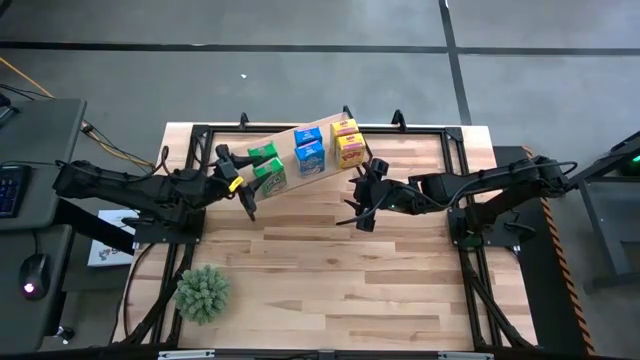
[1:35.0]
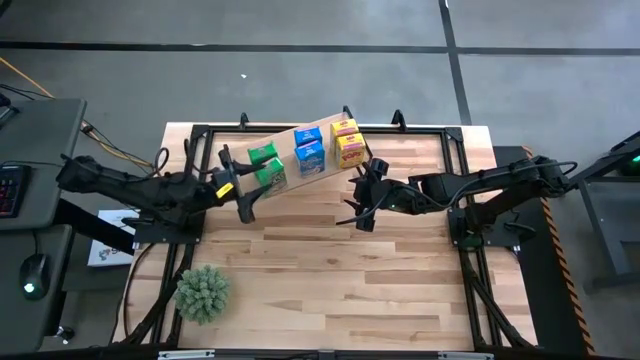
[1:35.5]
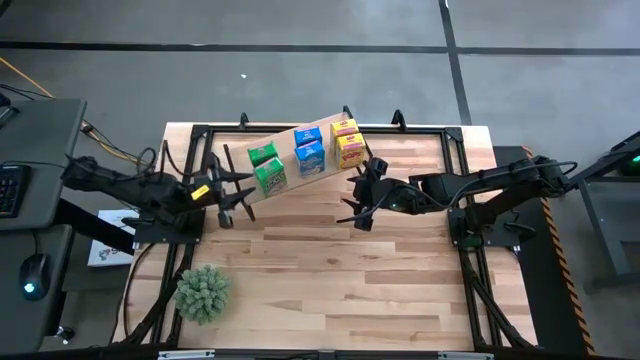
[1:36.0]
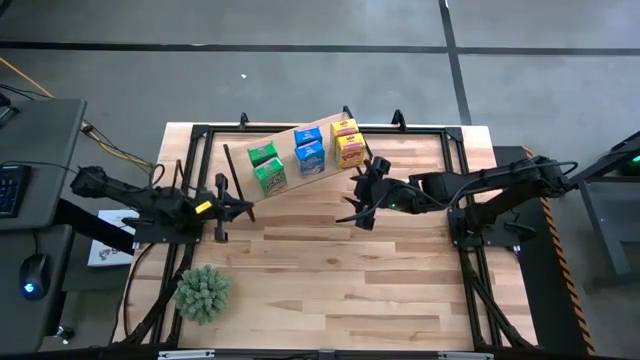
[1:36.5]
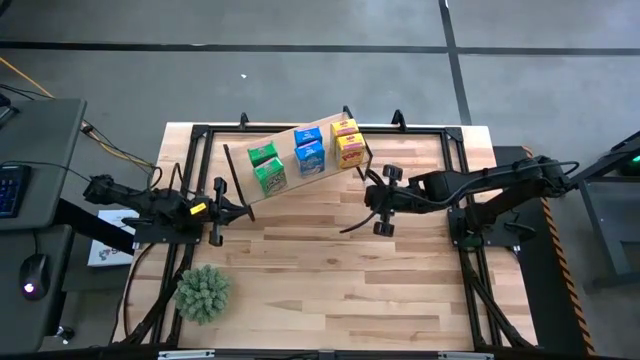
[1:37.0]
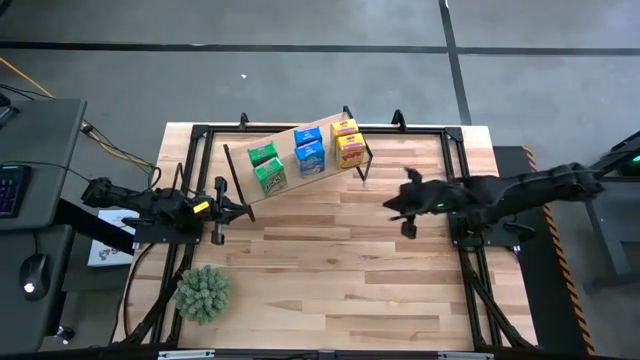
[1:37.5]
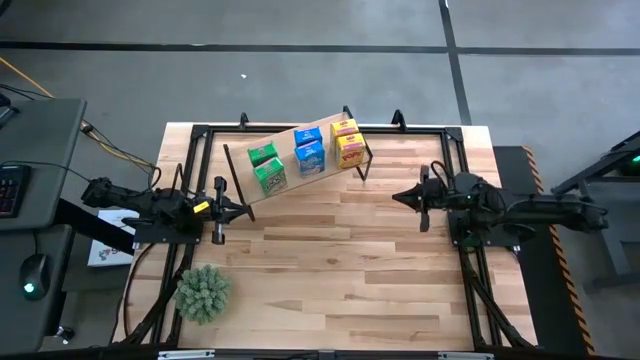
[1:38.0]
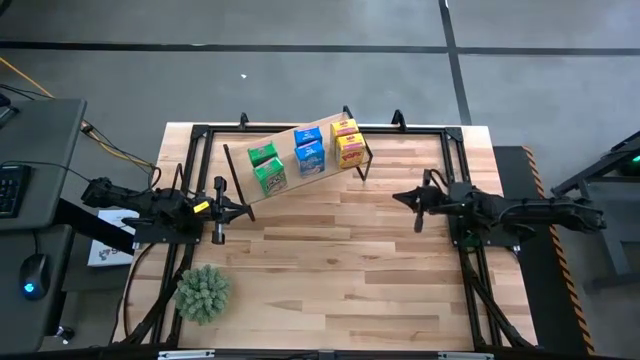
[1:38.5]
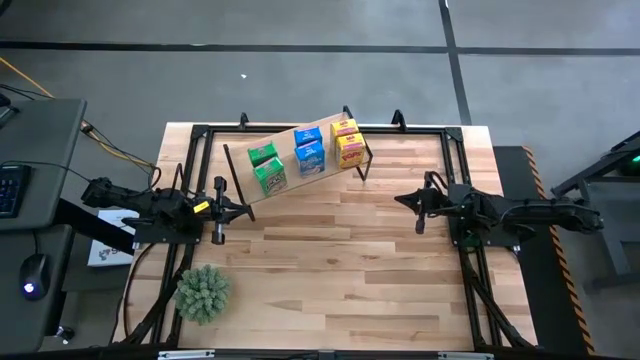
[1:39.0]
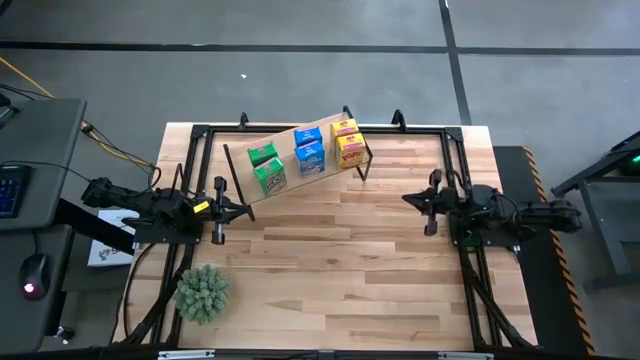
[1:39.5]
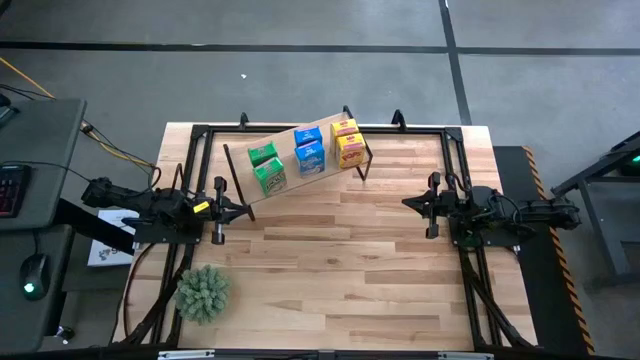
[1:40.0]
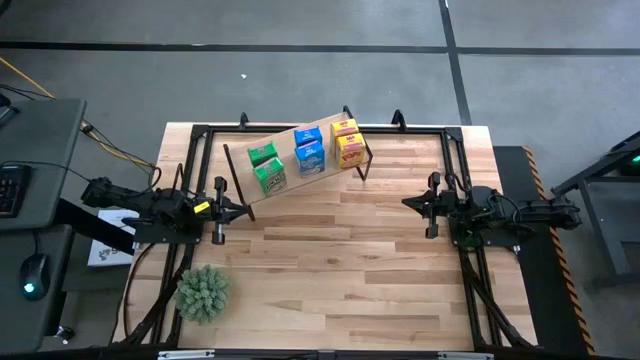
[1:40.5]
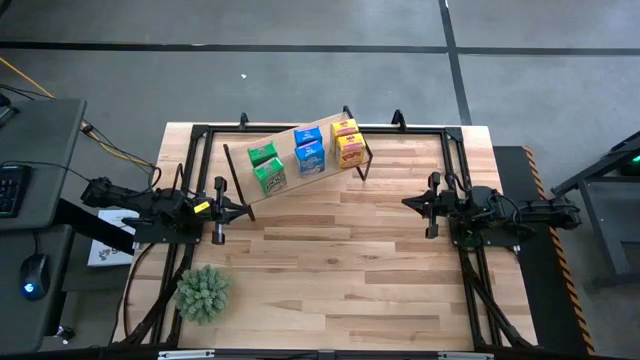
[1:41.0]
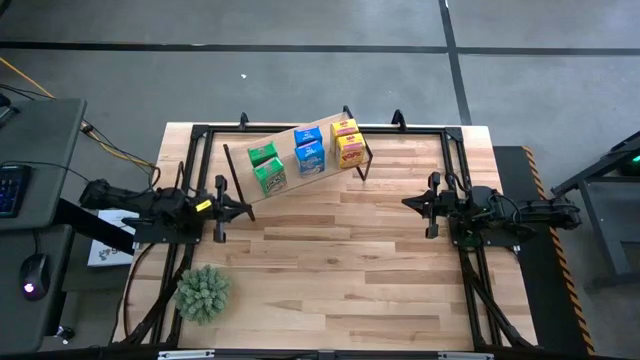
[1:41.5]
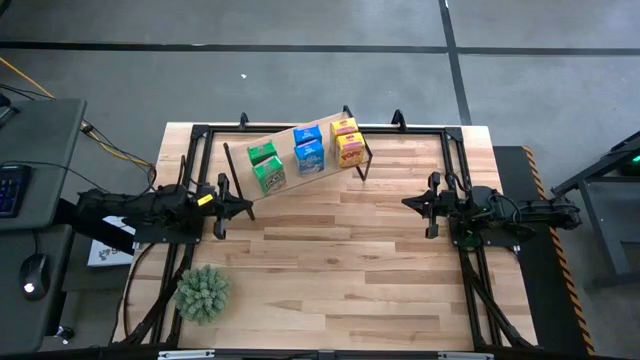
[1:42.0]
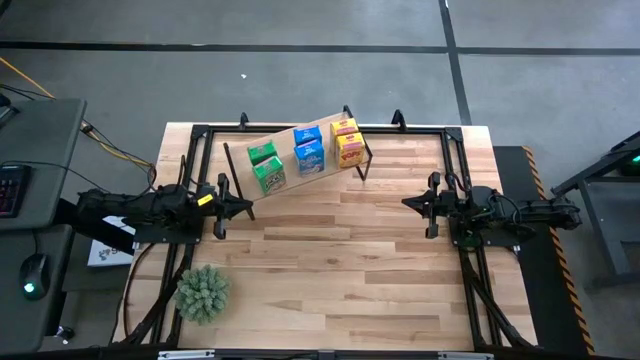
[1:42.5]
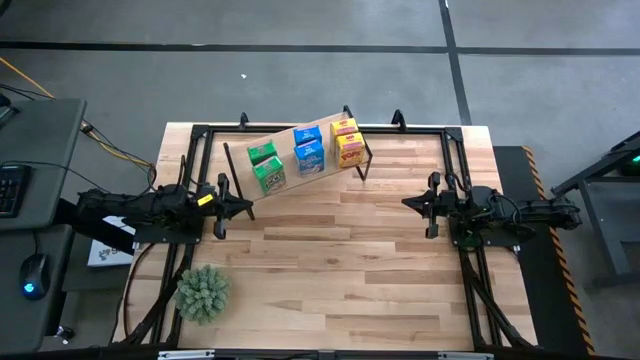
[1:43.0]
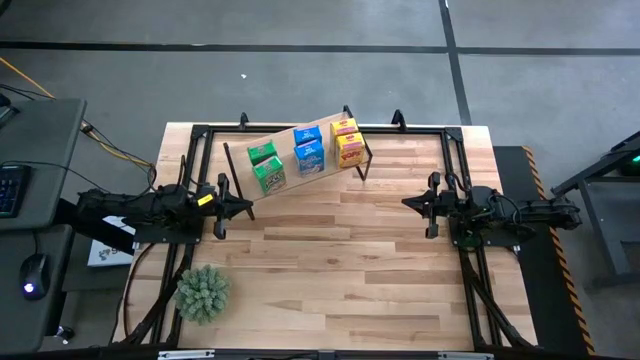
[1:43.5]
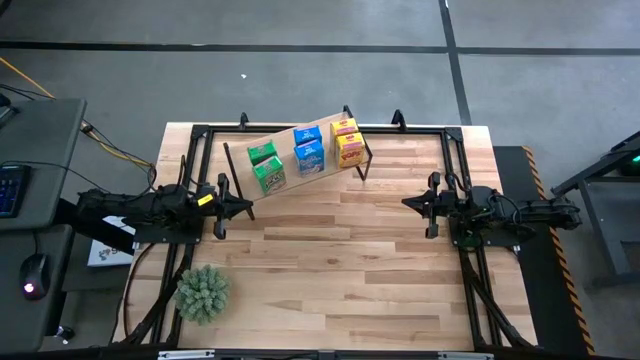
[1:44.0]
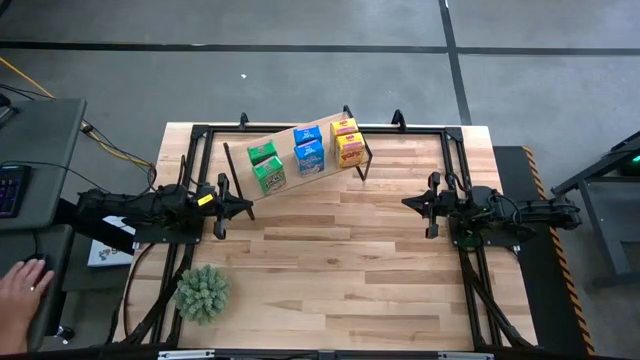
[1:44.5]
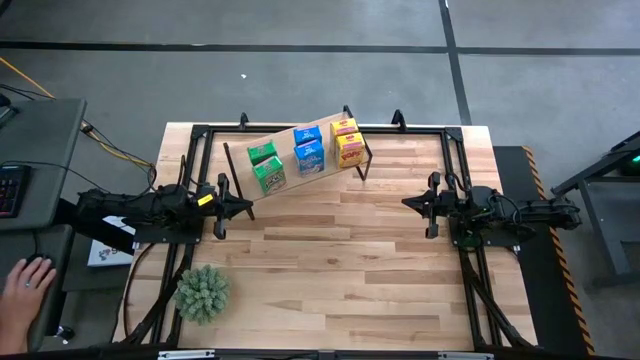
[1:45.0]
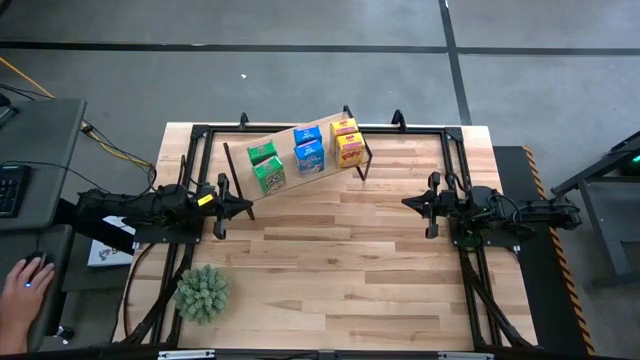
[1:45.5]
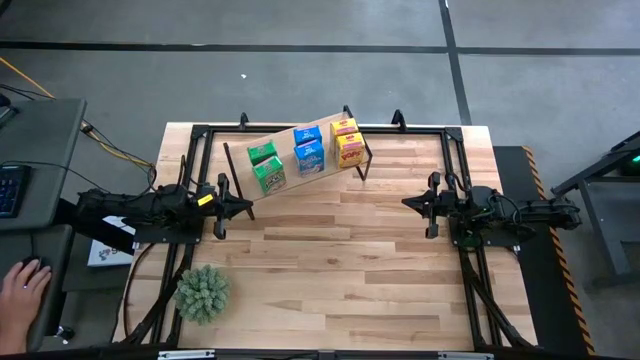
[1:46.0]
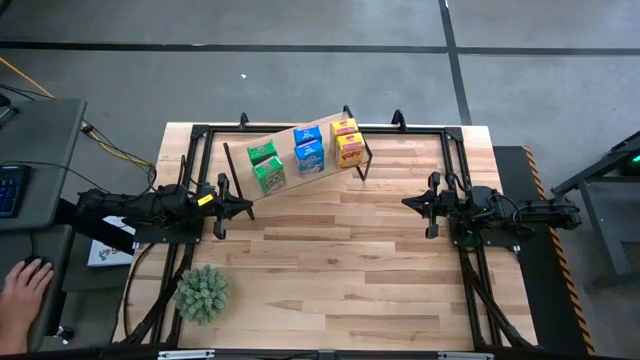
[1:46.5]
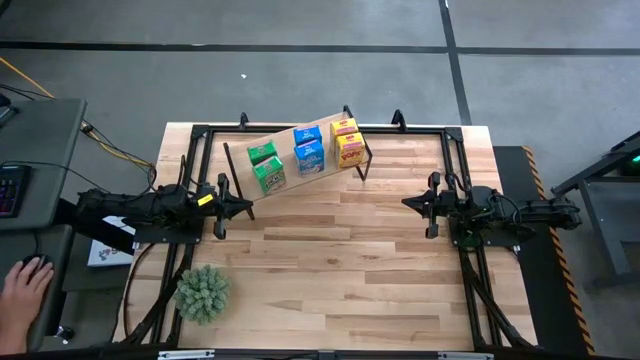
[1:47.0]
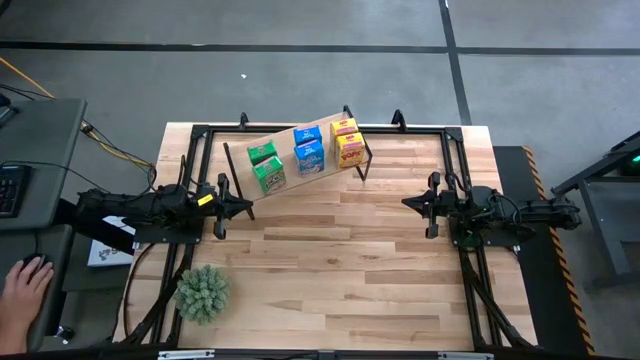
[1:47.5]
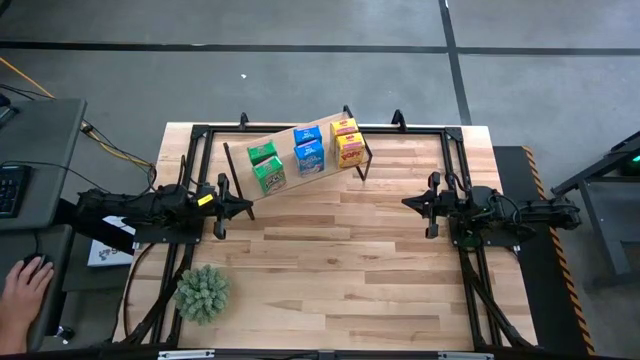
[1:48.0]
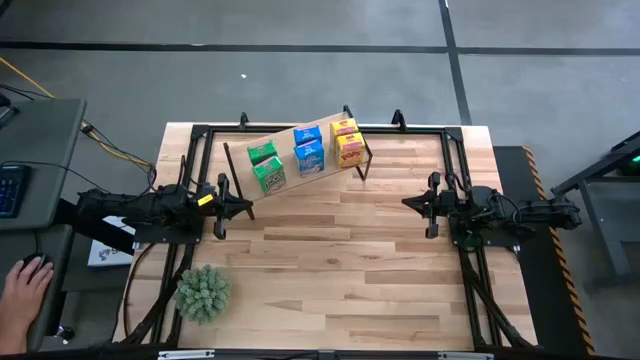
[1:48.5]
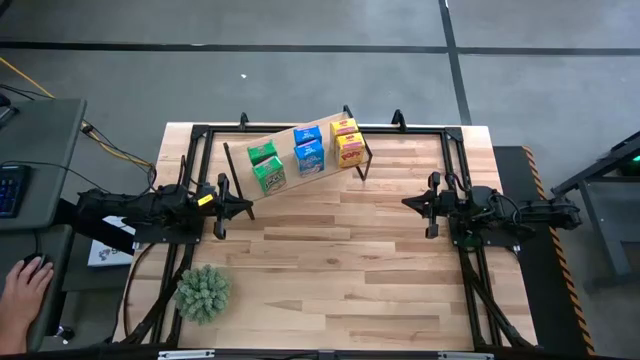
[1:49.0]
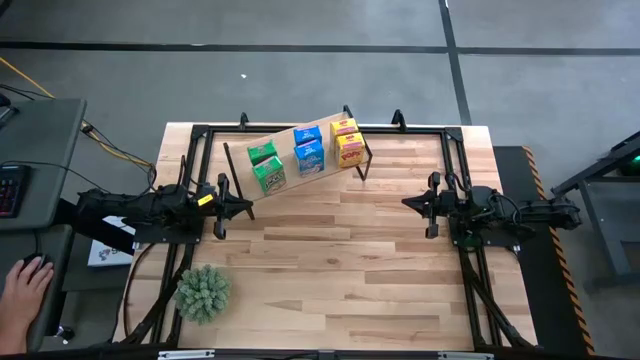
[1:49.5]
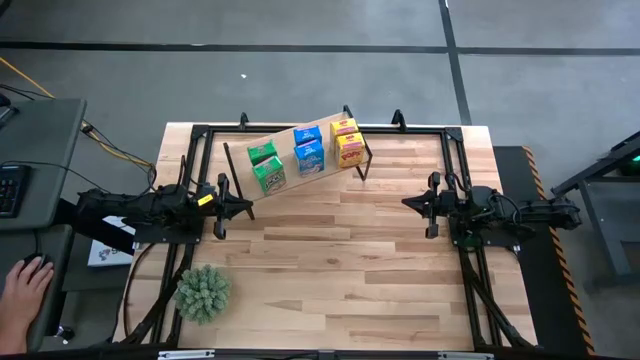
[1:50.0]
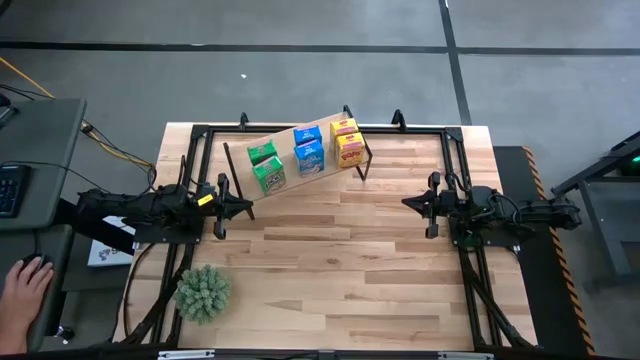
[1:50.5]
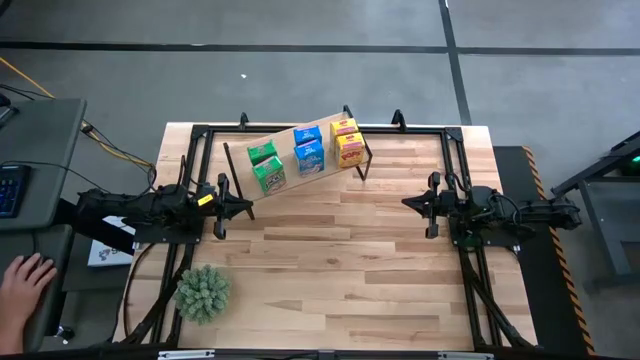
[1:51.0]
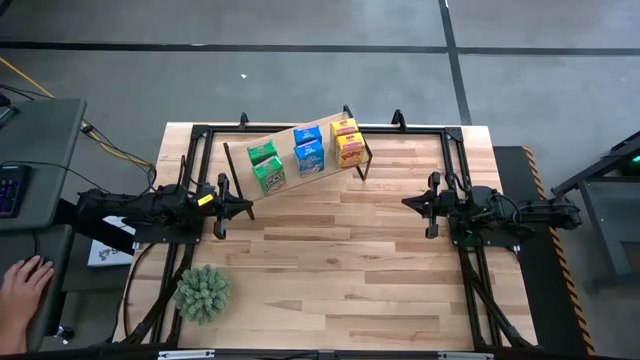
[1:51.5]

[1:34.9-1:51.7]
Task: Stack cereal on shelf
Return to Home Position

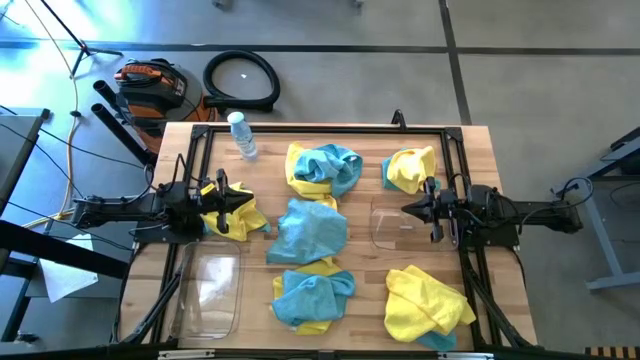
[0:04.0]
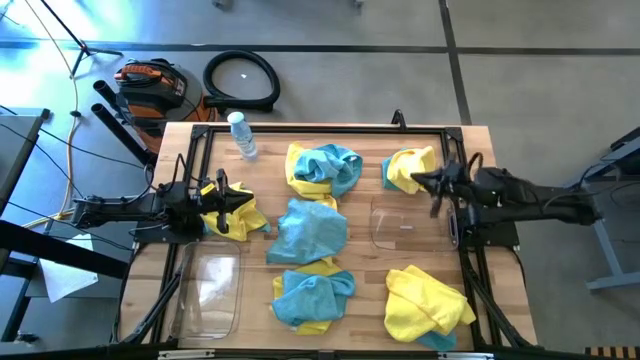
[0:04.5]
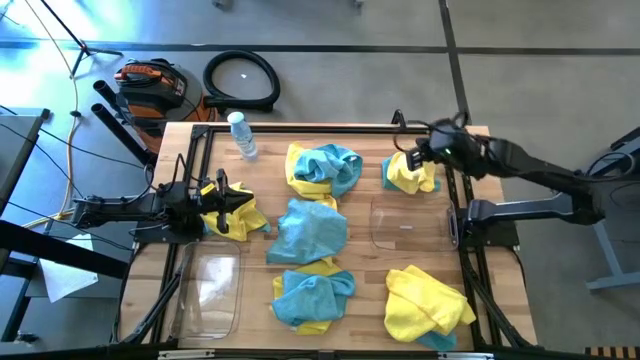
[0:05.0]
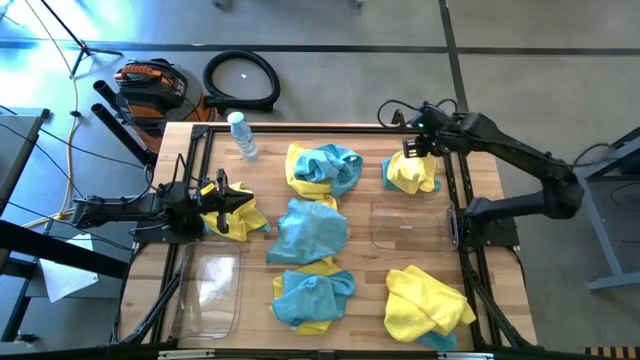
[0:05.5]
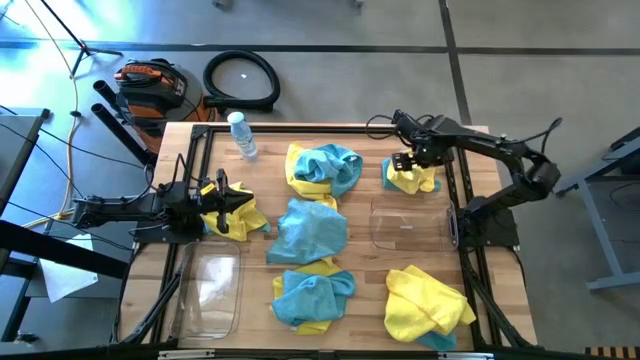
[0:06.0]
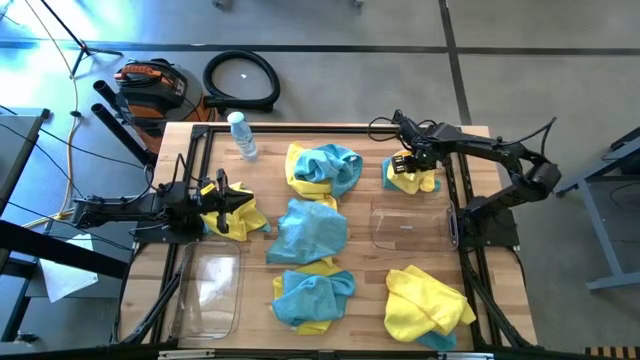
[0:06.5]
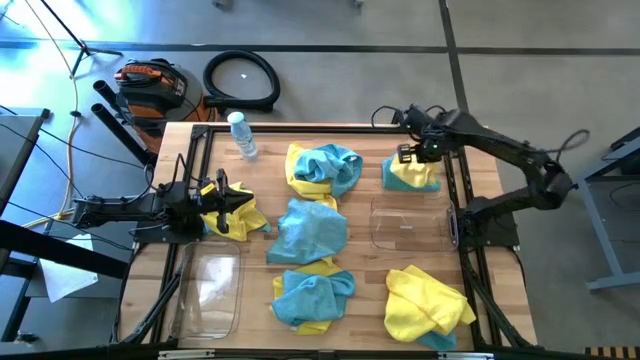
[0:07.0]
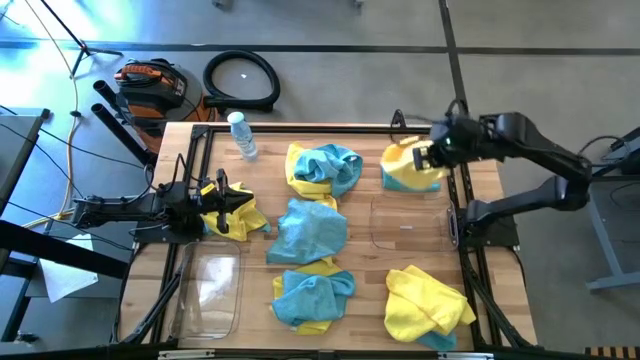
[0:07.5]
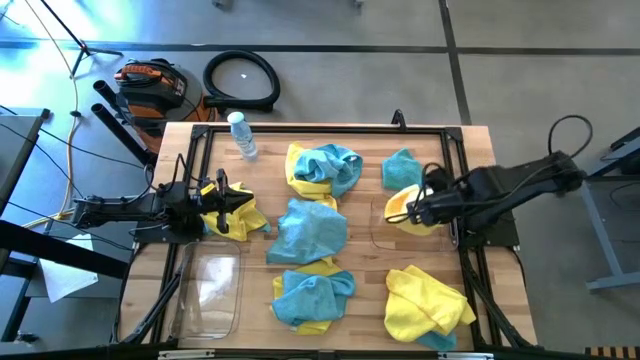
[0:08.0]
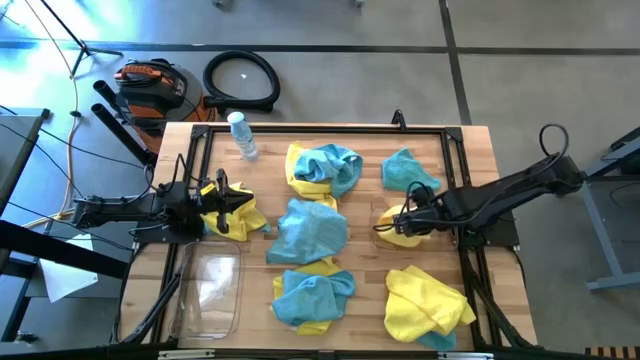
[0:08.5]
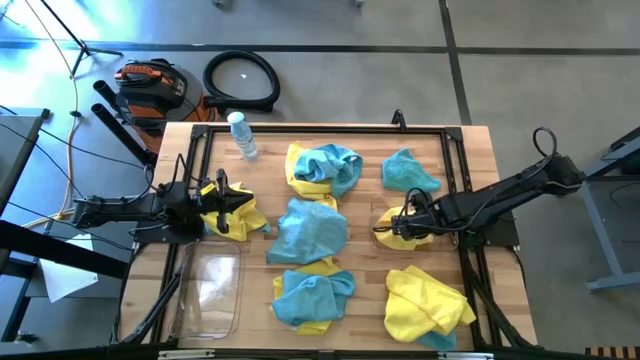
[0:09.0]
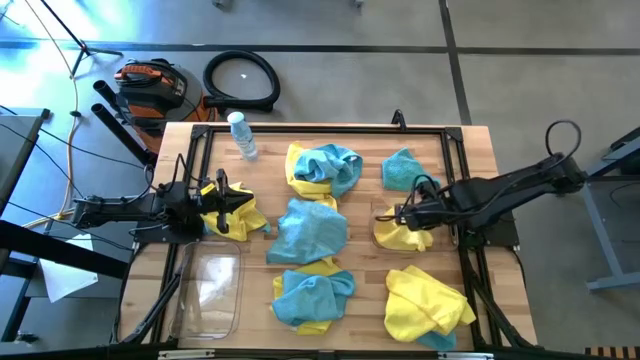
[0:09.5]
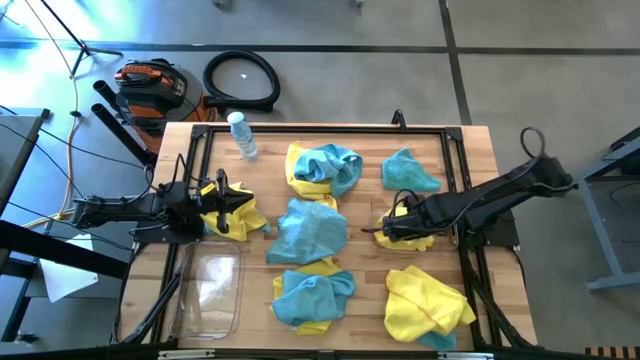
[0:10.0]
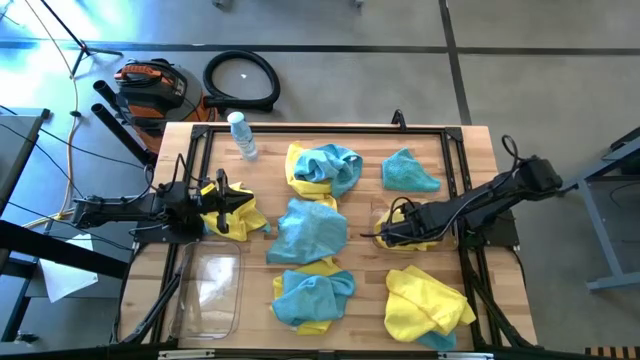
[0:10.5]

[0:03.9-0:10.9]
Task: Sort microfiber towel by color & place in baskets
Put the yellow microfiber towel into the right transparent bin
